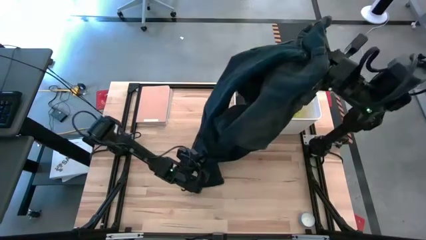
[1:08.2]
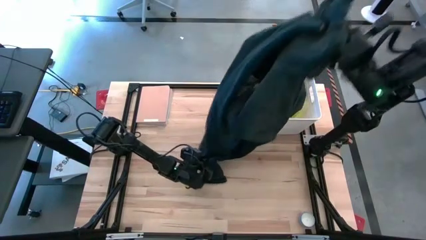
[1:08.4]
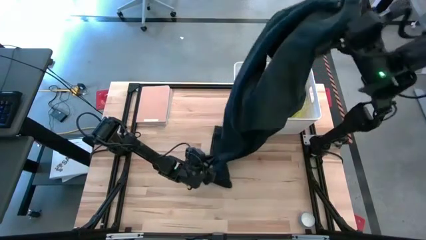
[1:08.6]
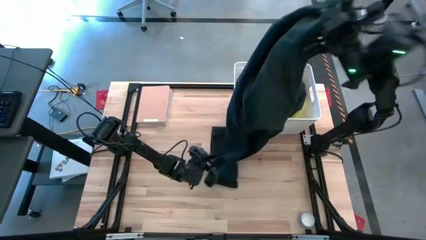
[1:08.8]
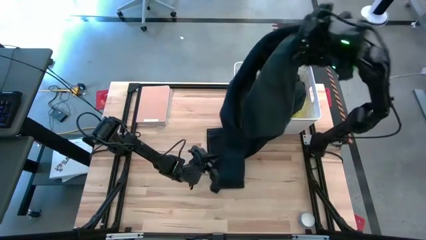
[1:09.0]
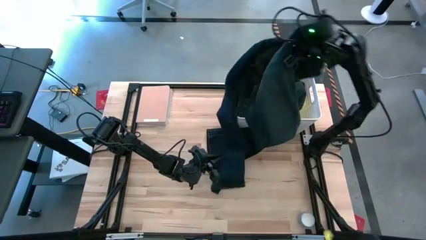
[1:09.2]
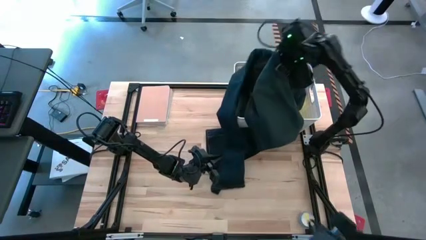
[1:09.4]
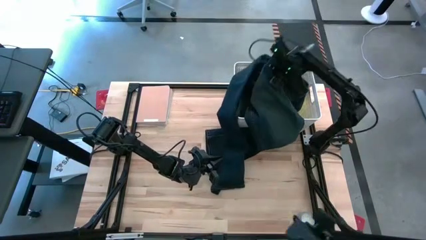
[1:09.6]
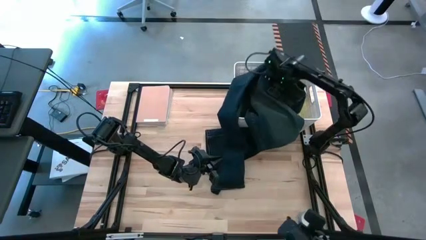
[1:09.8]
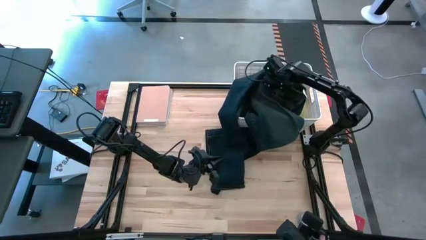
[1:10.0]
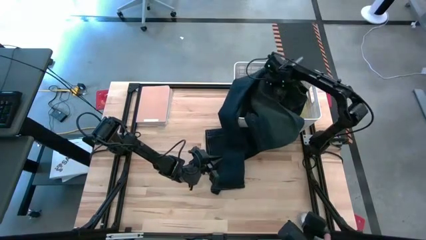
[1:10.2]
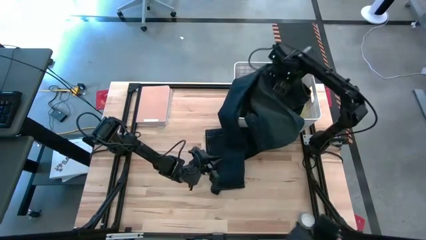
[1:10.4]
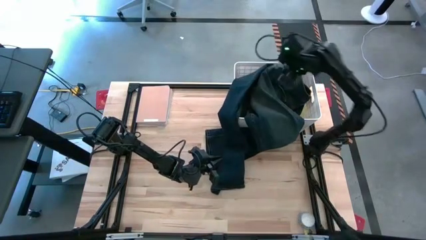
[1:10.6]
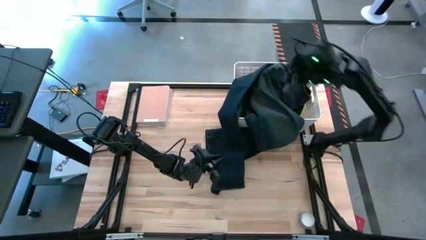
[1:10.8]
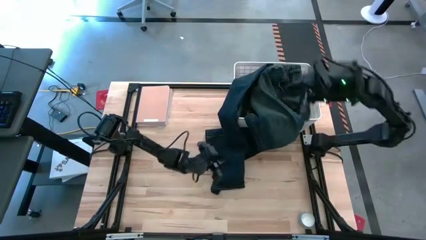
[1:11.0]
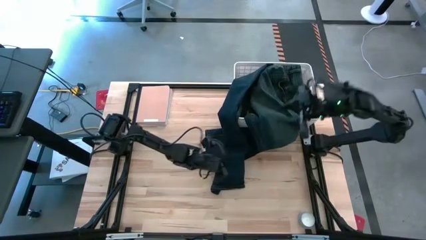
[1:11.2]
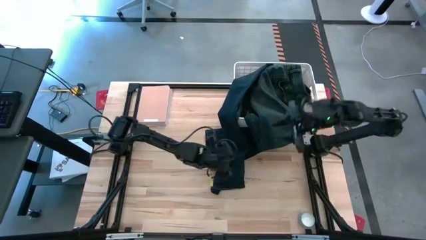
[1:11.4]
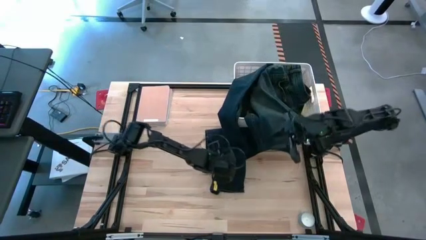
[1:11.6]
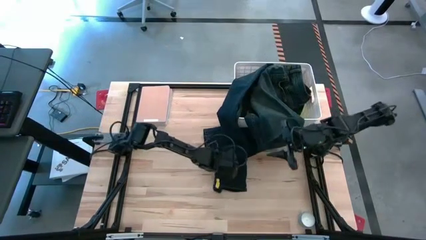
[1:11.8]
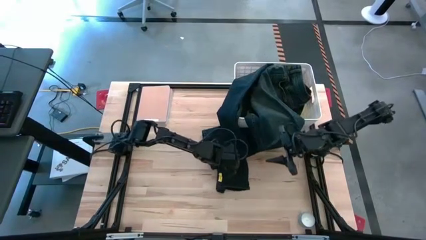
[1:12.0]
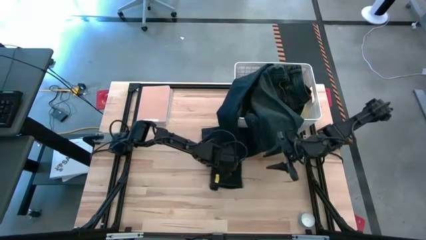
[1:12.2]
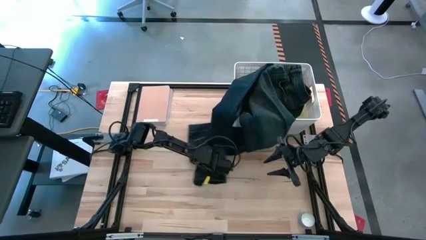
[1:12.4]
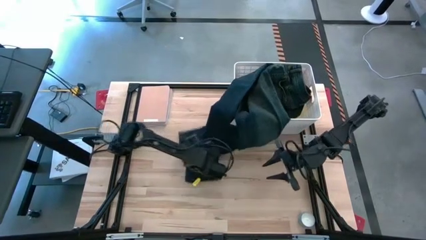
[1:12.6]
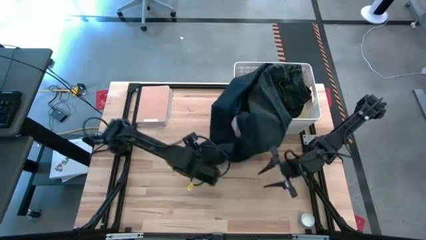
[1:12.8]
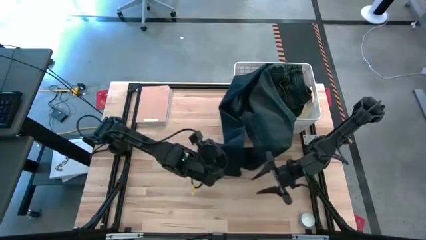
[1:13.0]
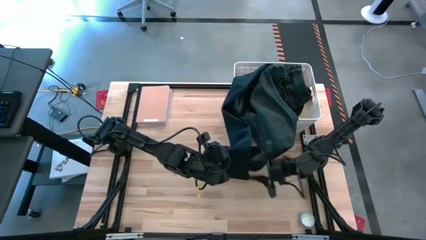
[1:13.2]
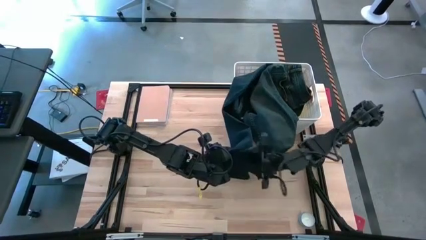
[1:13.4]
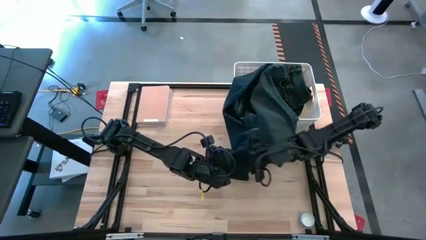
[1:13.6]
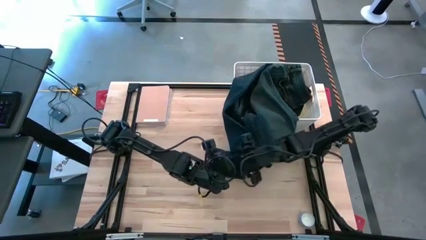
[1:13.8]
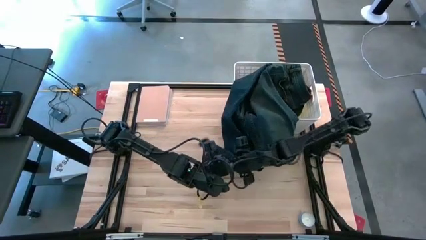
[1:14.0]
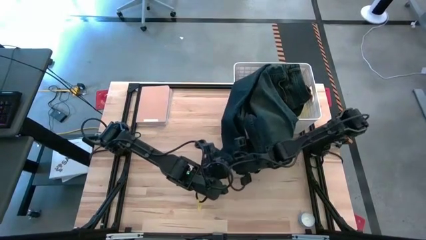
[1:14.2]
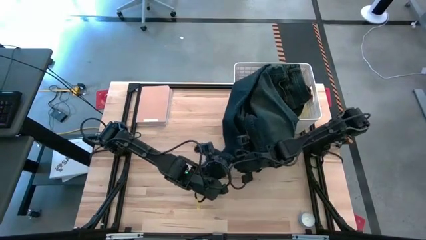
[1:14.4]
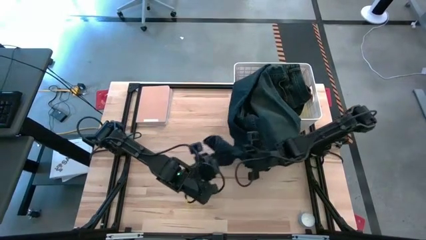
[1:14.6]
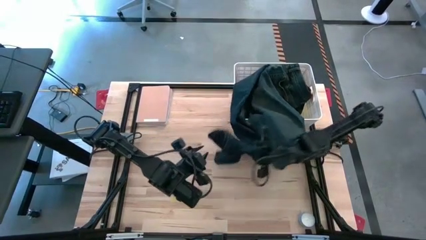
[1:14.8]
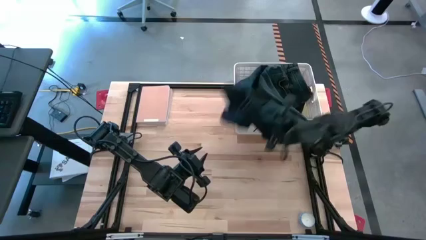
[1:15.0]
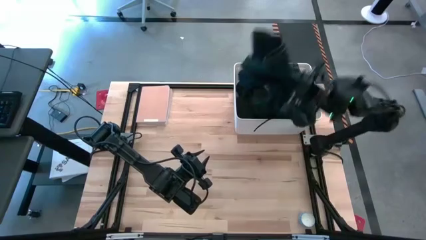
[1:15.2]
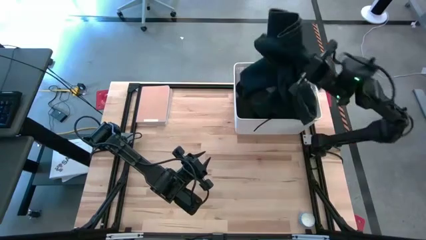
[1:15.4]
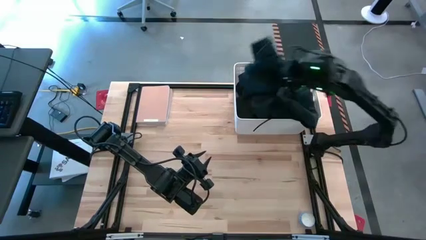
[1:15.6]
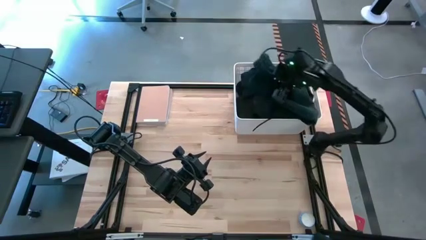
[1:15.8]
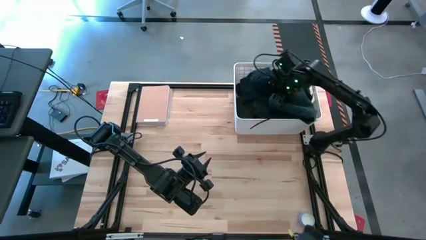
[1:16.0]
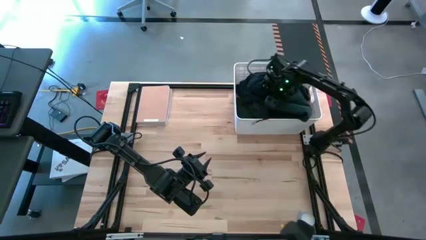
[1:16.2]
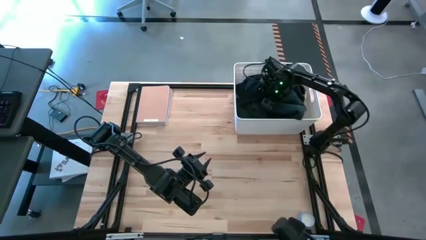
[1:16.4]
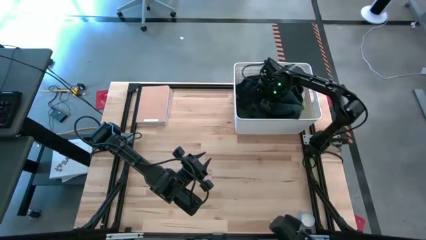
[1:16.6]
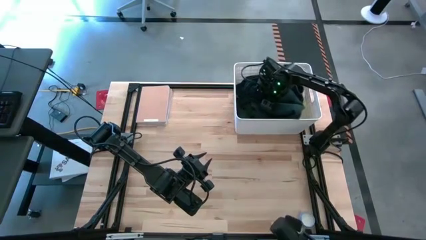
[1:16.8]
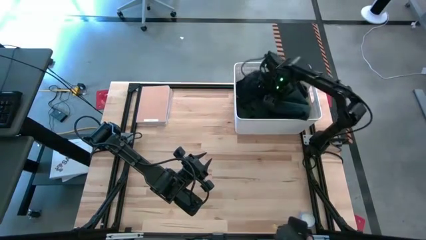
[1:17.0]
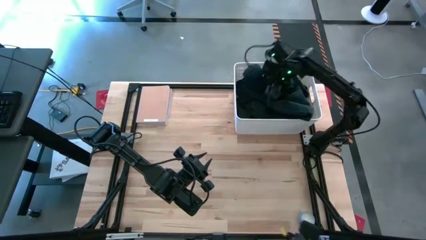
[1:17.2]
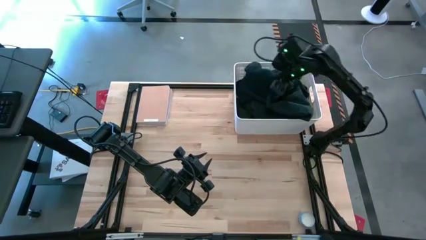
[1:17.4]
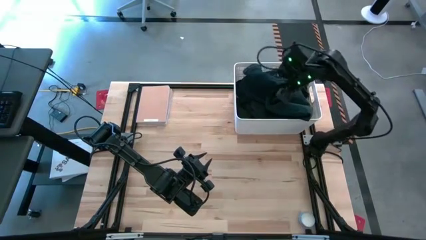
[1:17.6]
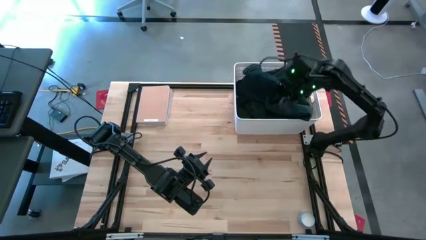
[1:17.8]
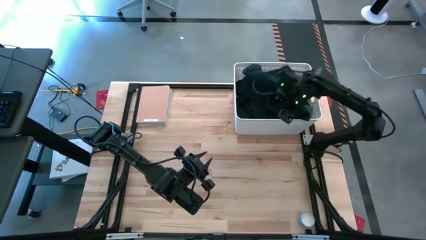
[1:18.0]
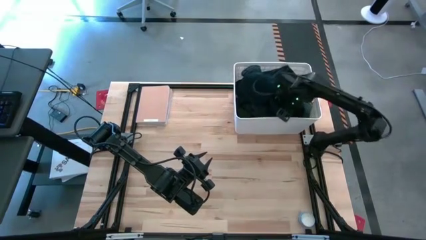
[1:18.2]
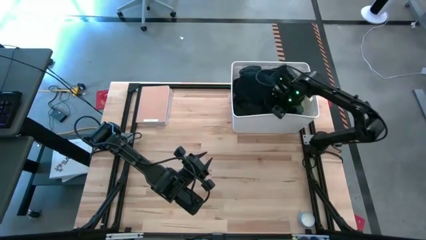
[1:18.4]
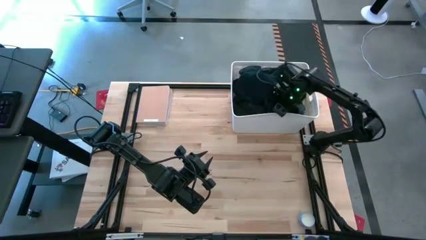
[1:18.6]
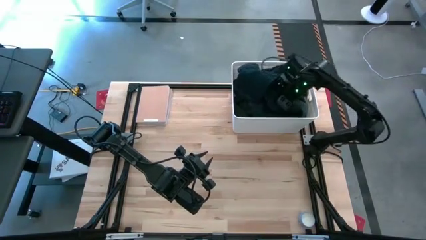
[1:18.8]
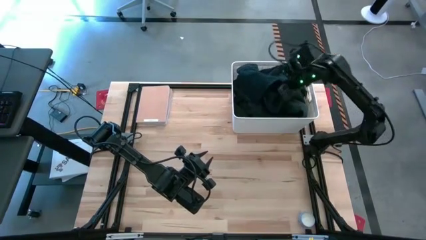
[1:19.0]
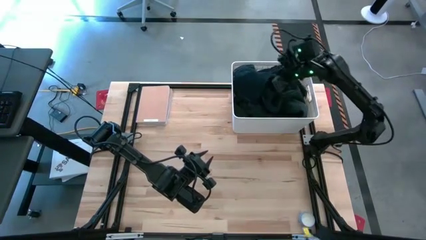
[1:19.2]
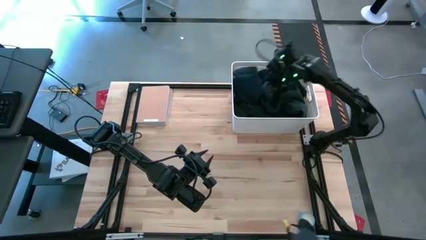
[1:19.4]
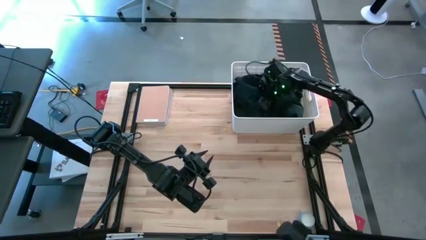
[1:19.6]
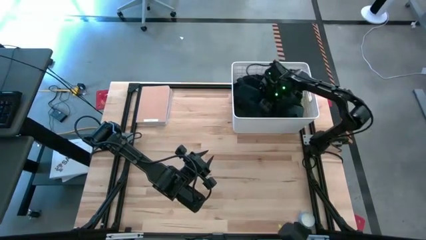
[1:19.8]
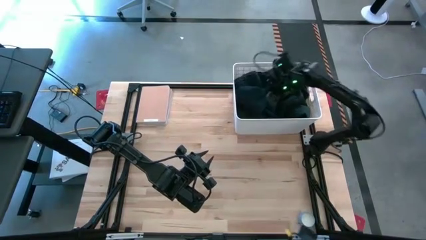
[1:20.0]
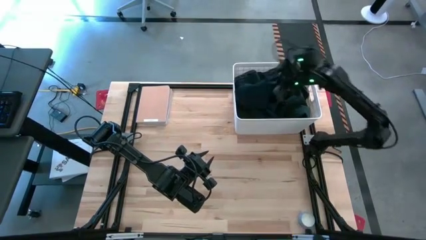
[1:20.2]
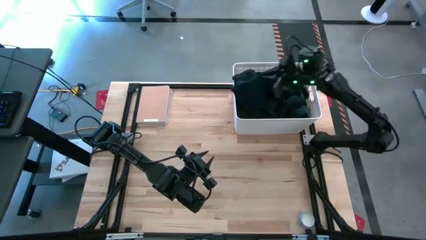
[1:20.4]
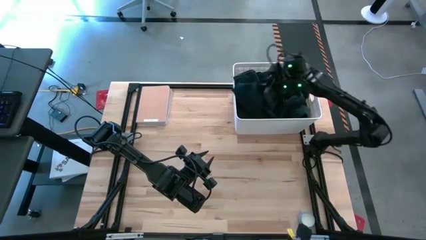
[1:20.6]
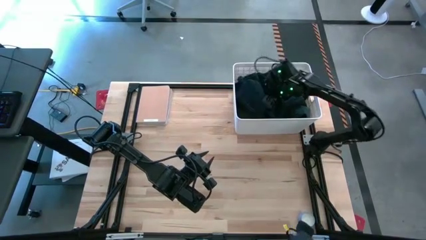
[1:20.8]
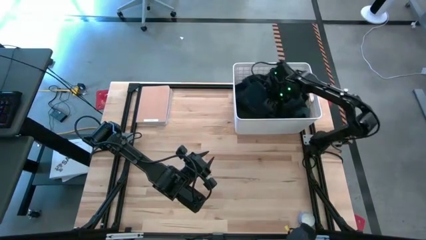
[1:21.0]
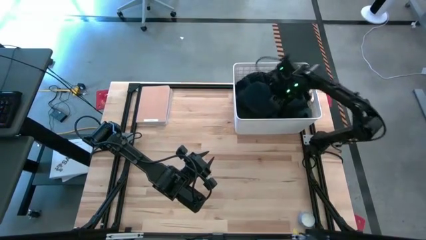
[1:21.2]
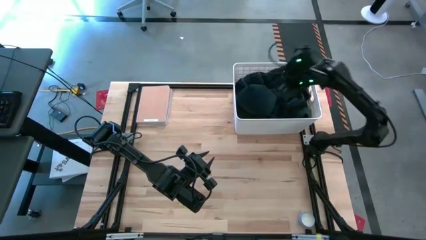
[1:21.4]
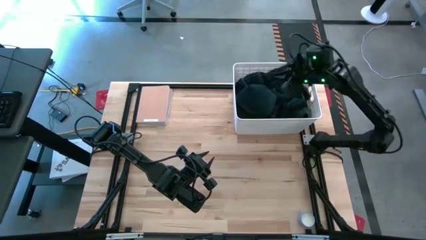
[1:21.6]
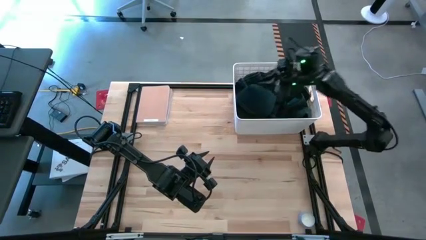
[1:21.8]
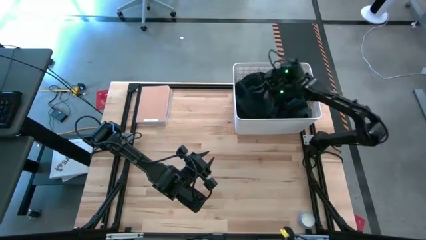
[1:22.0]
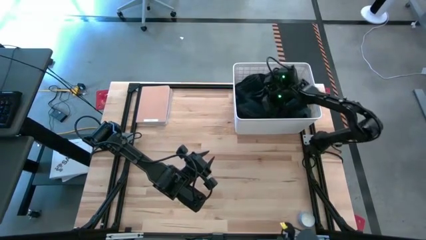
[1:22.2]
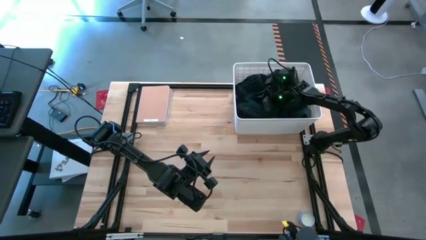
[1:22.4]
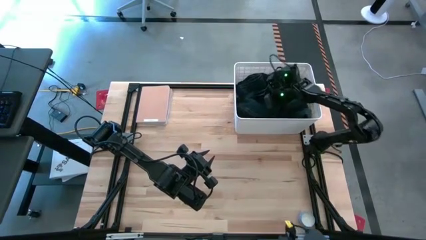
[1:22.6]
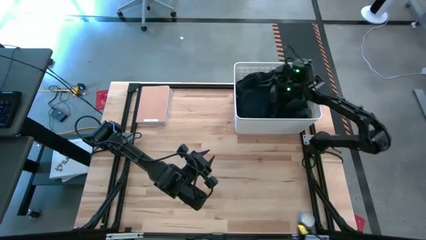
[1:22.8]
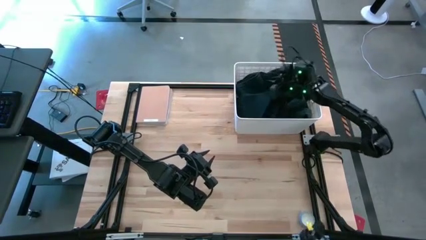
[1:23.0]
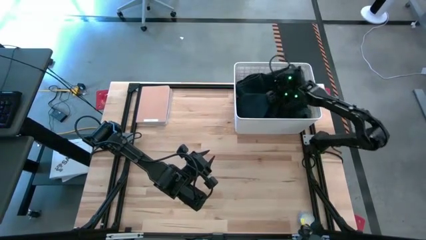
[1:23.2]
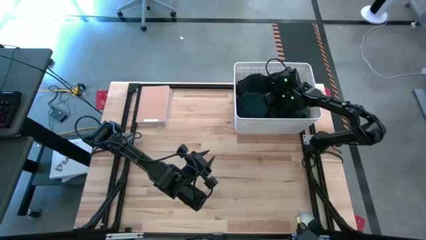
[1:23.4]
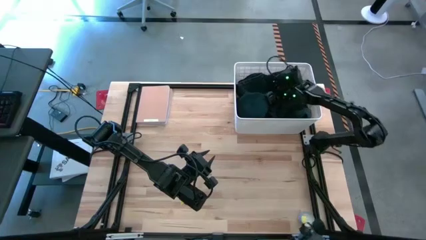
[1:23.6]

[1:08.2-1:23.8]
Task: Sort clothes
Put the dark blue jeans into the white laundry bin
